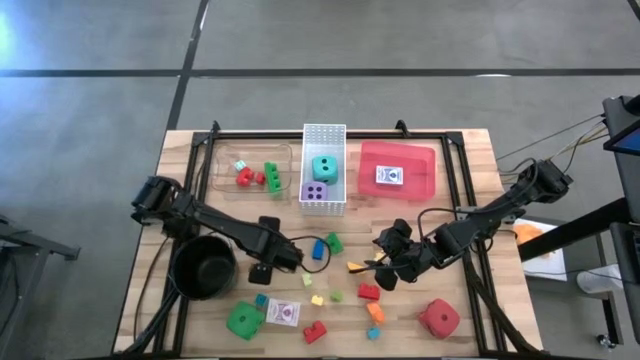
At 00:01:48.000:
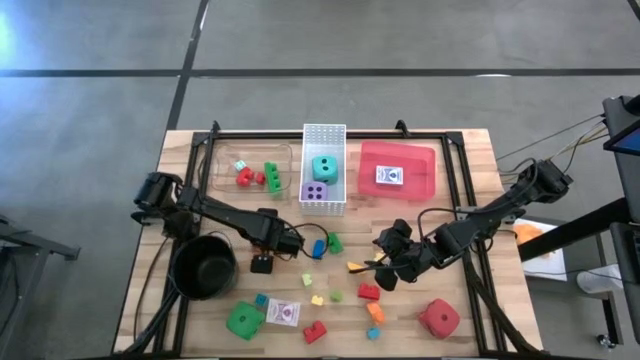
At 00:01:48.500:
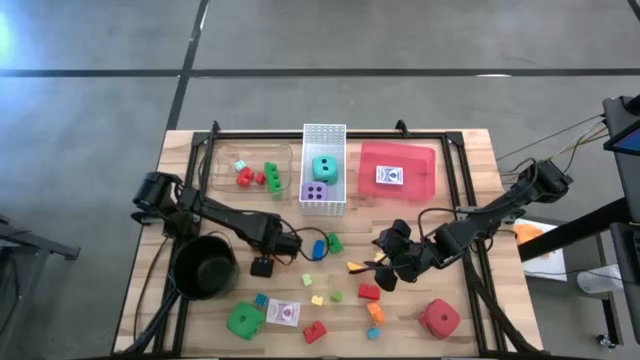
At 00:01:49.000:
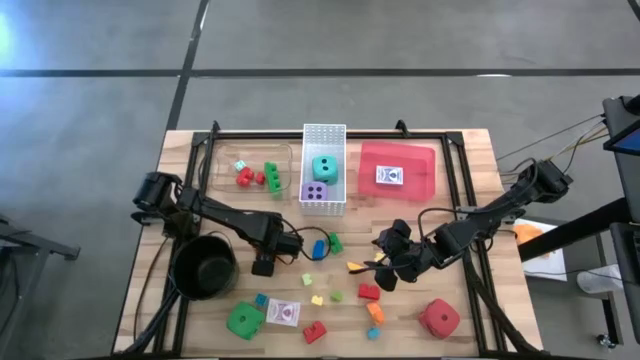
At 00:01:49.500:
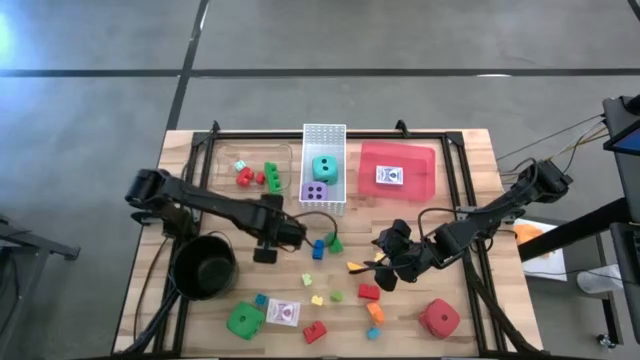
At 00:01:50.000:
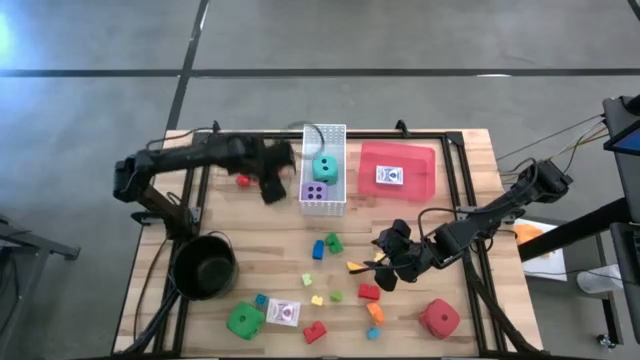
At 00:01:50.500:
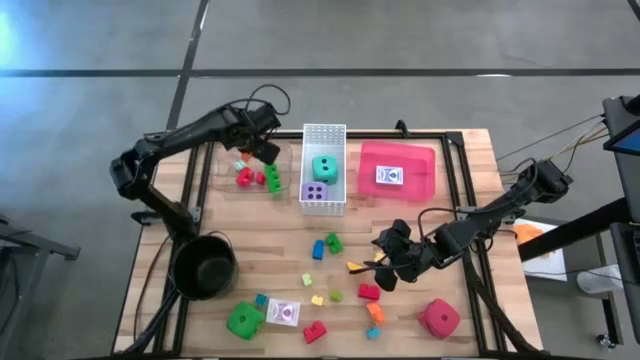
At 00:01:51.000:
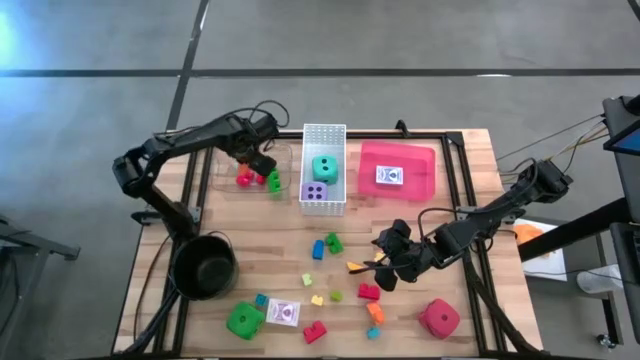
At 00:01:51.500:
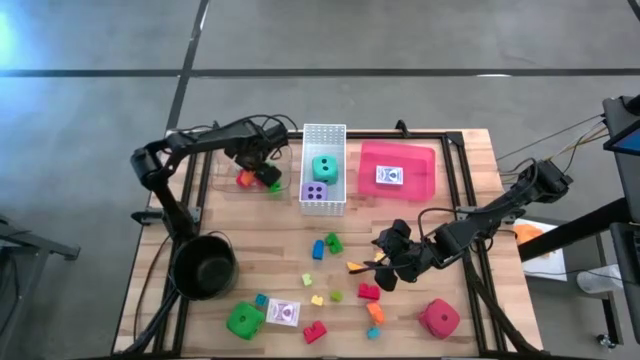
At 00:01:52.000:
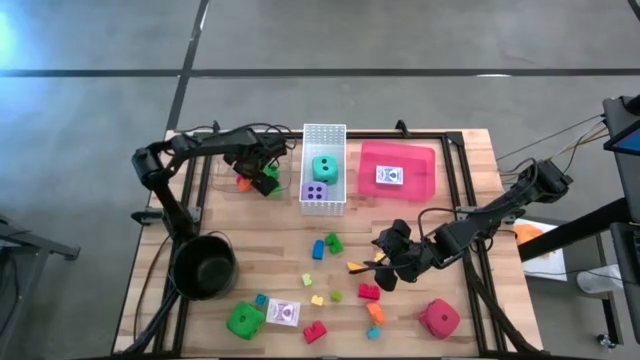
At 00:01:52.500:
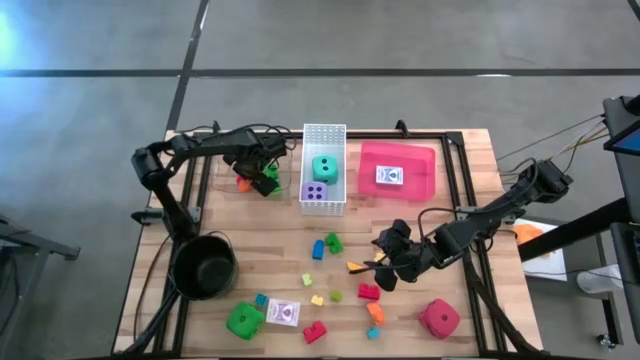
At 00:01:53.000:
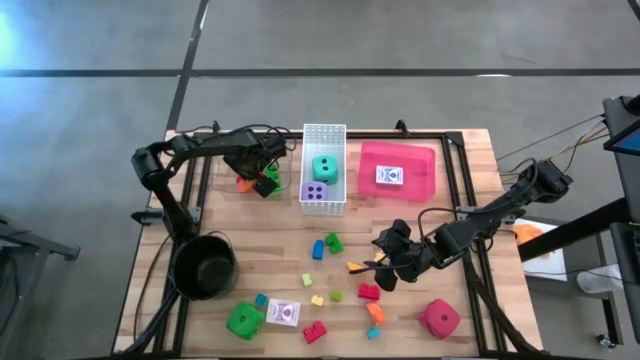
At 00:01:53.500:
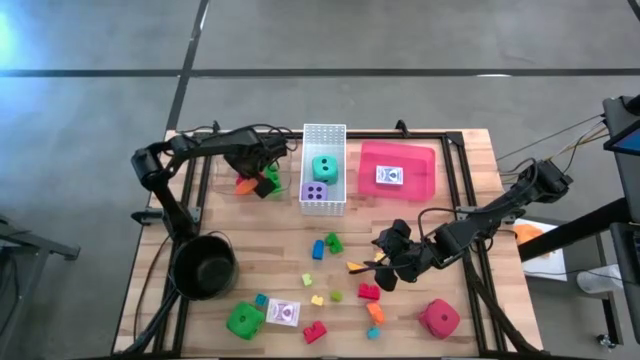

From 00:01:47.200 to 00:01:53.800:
Task: Pick & Place Toys
Put the orange game piece into the transparent bin

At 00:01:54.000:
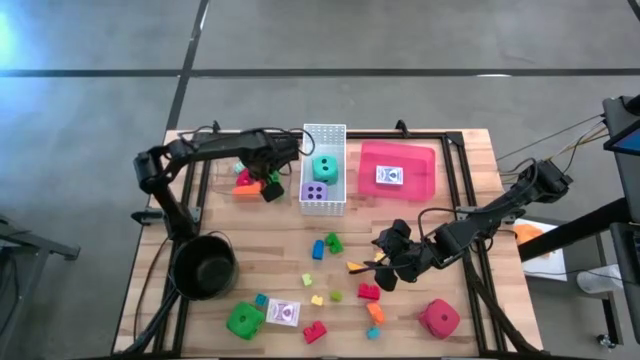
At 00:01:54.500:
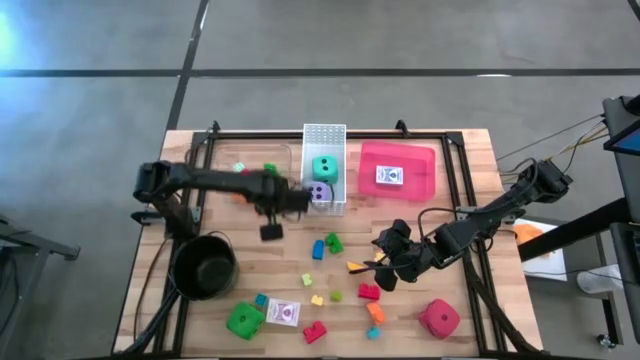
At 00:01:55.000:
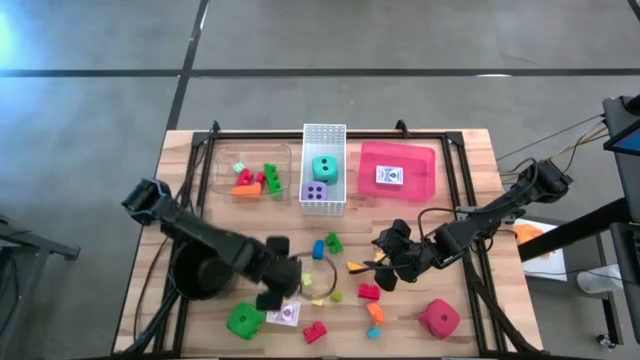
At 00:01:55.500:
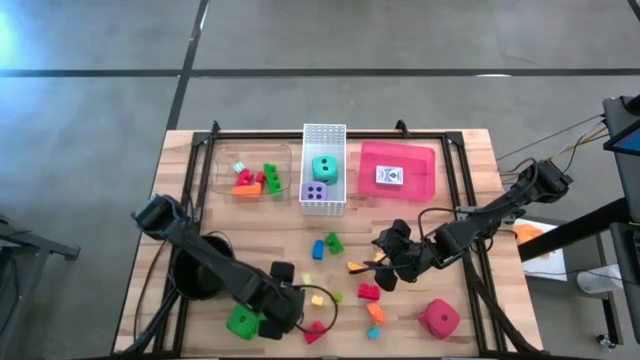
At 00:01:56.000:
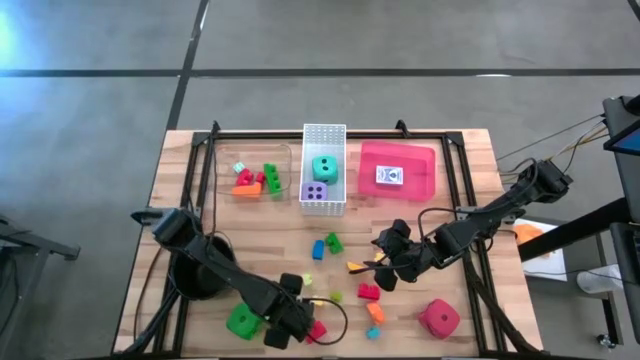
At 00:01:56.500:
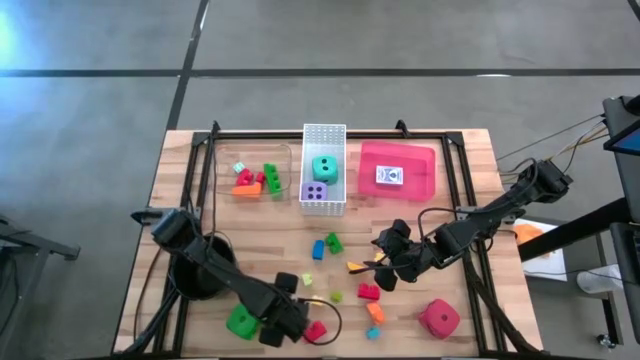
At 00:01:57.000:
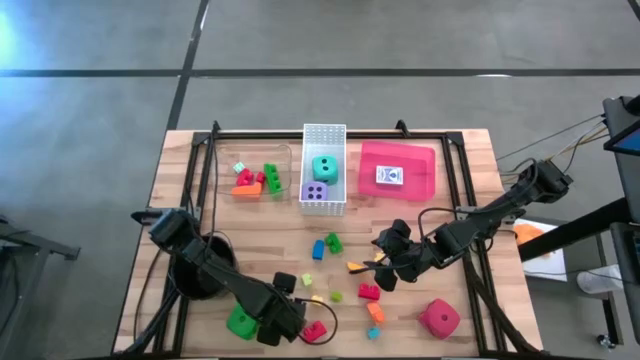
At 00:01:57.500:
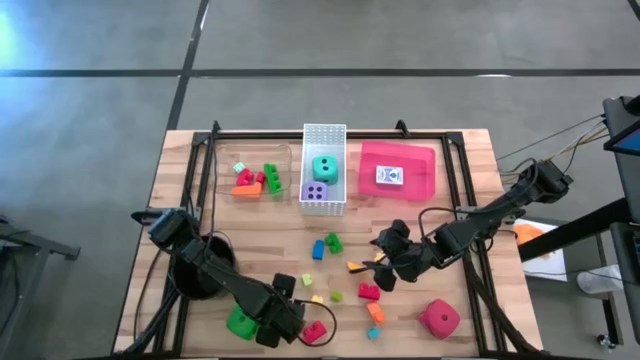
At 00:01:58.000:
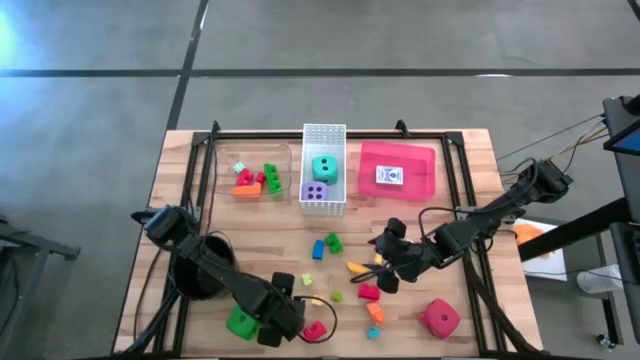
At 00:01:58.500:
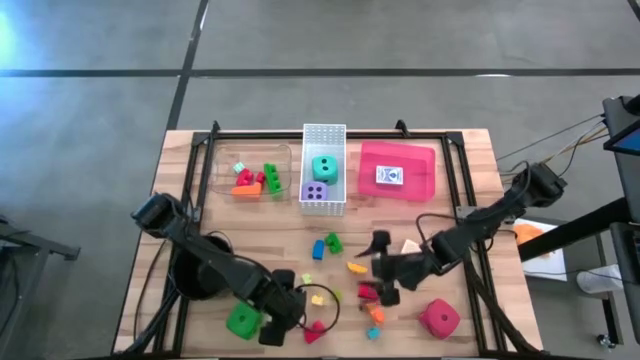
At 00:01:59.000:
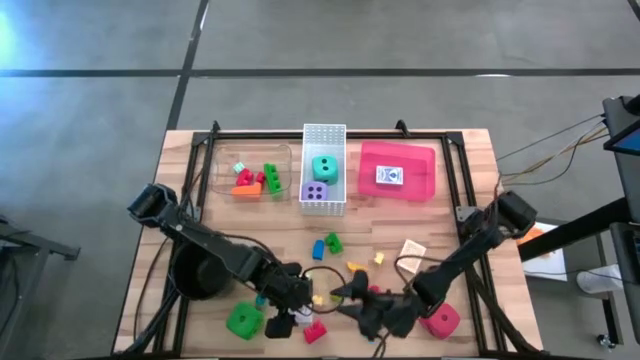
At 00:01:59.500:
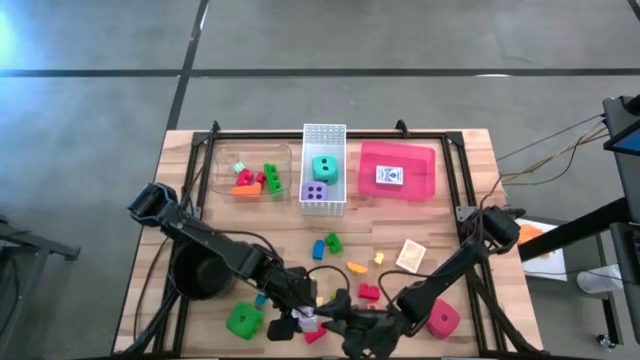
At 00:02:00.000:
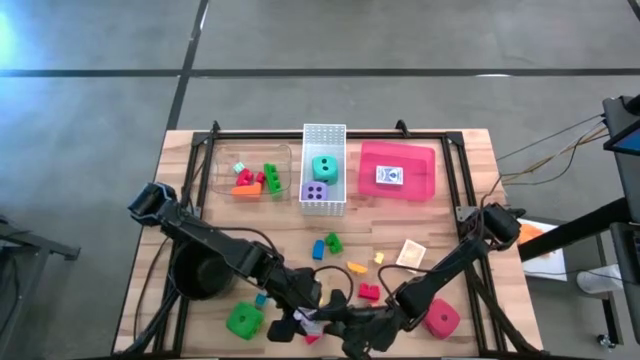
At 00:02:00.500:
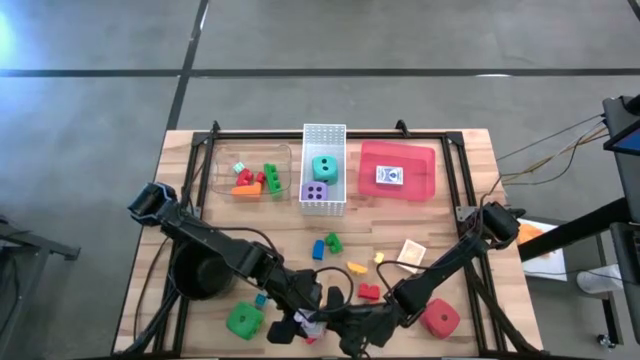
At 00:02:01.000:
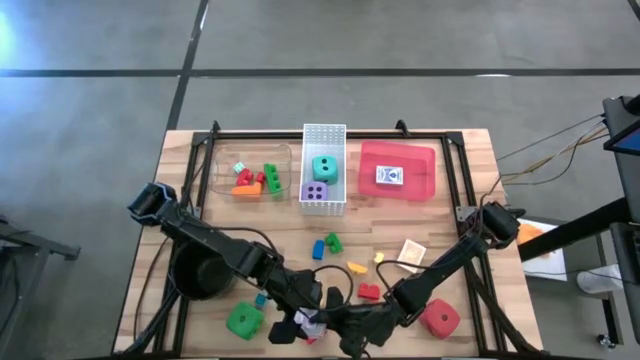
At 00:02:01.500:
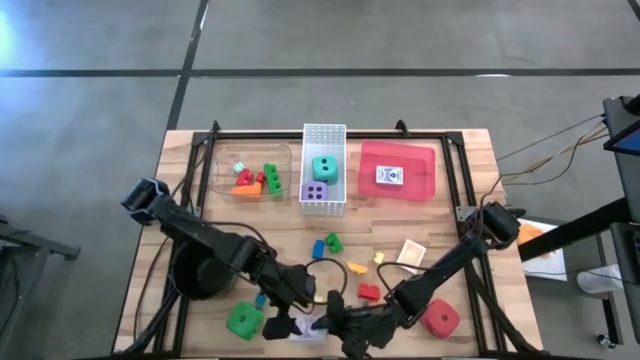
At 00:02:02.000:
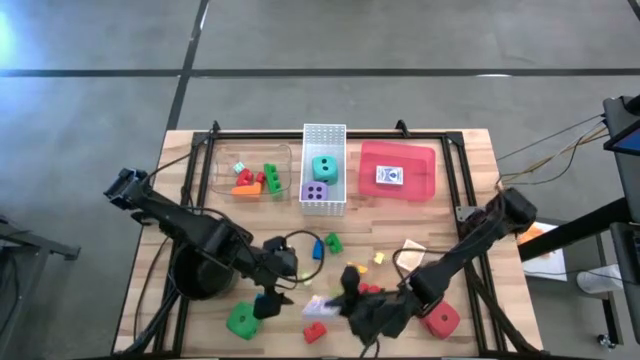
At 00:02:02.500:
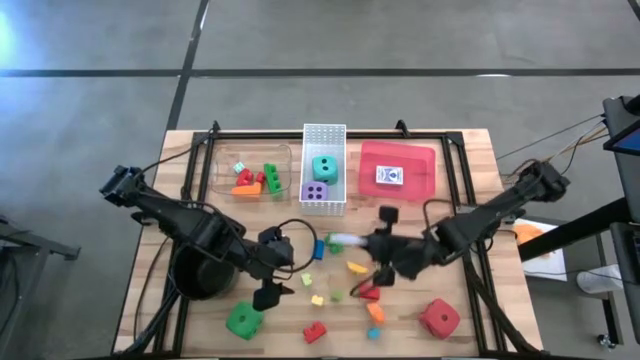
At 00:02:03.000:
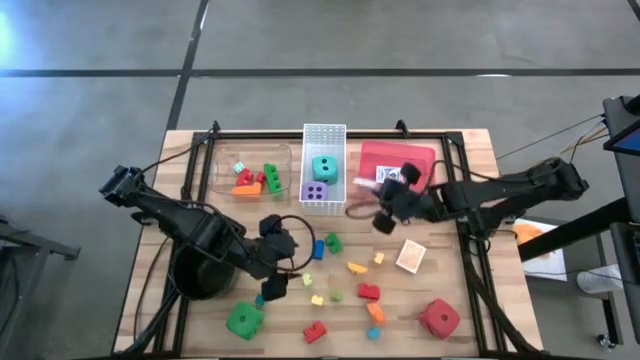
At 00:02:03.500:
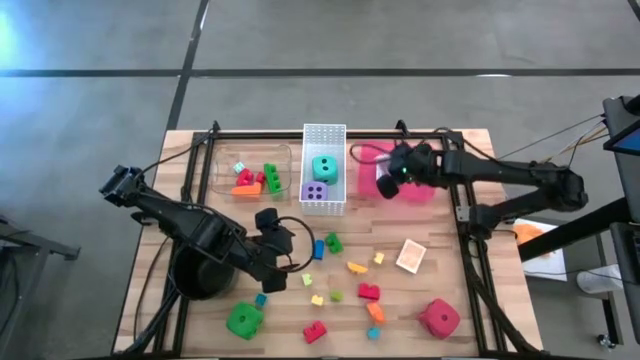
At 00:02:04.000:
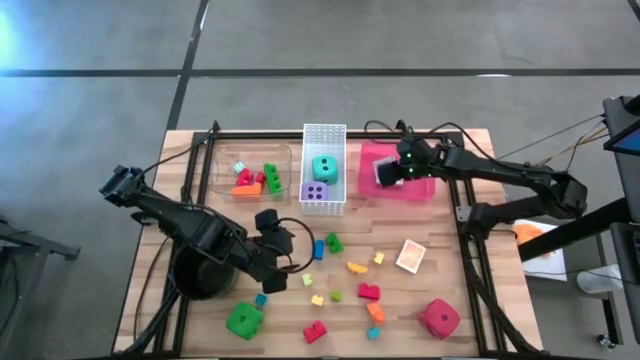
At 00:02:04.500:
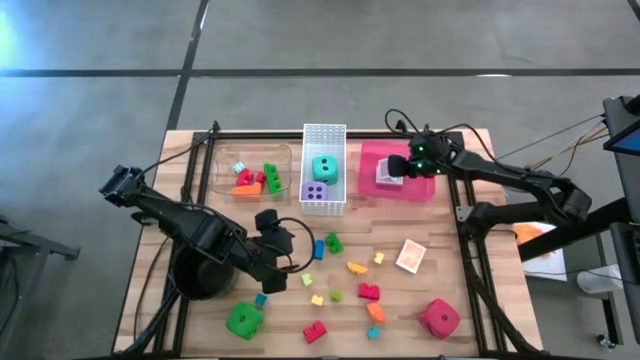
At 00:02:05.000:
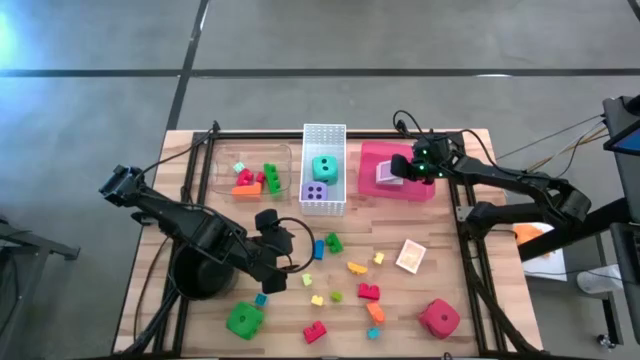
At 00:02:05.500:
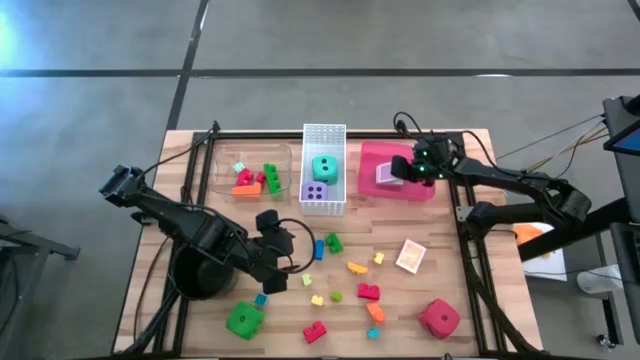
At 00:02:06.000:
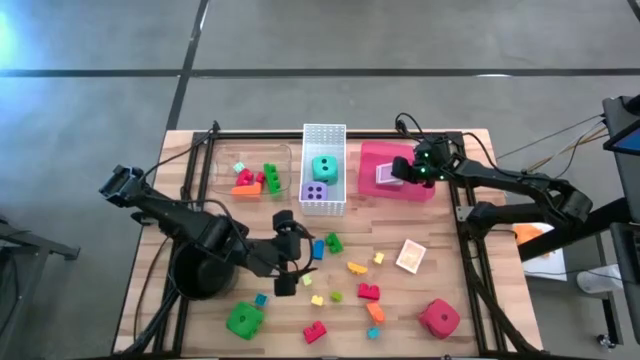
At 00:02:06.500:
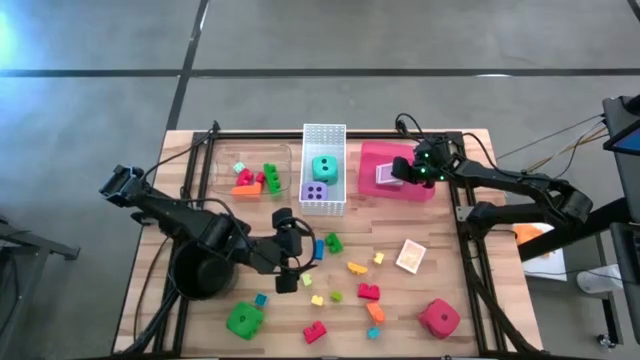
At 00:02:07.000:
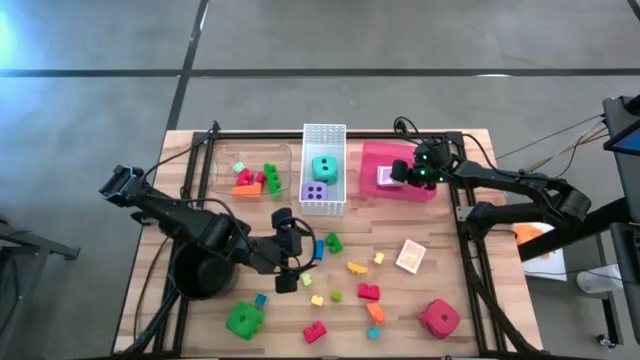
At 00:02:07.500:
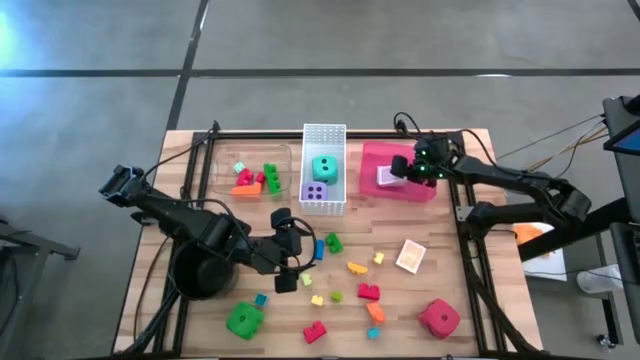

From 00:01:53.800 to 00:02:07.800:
Put the purple deck of cards into the red bin
